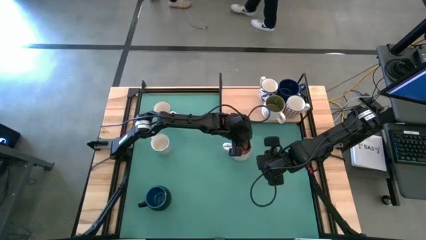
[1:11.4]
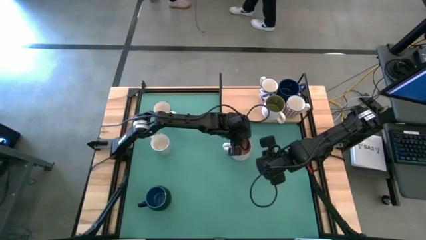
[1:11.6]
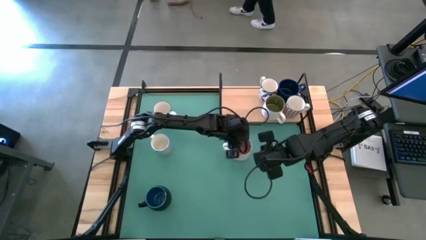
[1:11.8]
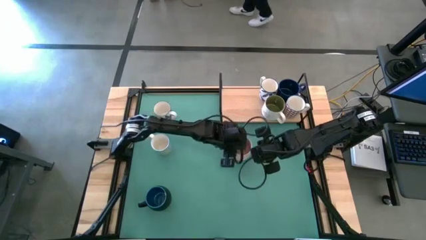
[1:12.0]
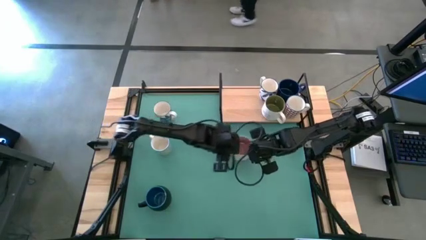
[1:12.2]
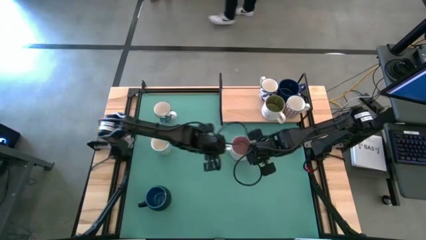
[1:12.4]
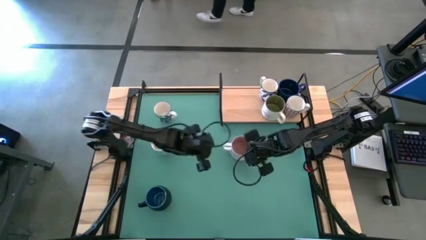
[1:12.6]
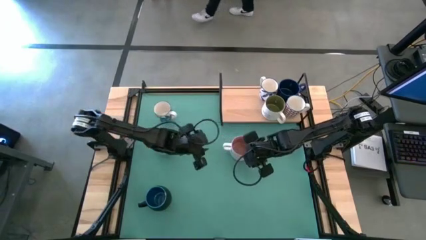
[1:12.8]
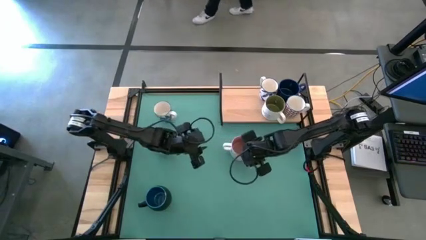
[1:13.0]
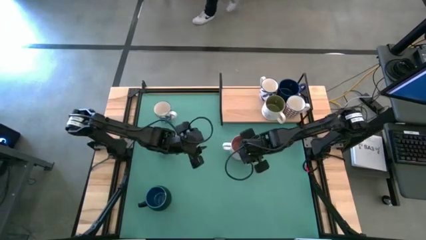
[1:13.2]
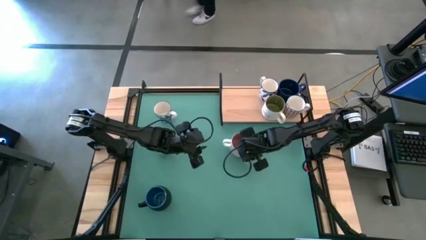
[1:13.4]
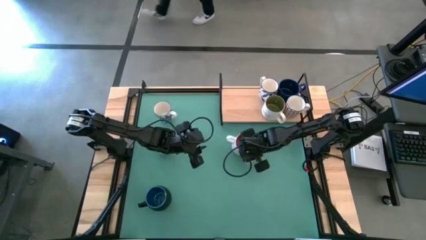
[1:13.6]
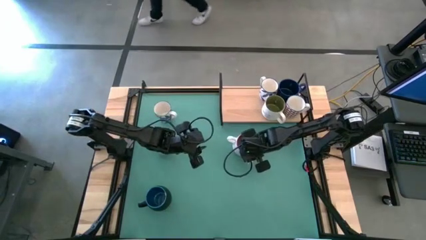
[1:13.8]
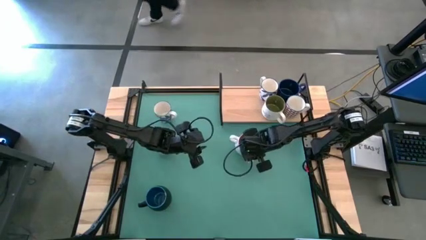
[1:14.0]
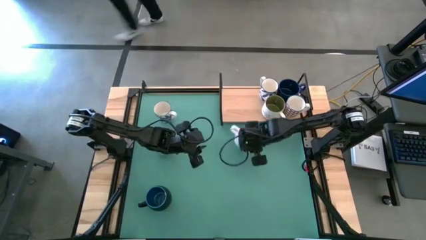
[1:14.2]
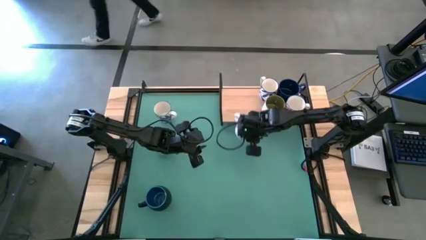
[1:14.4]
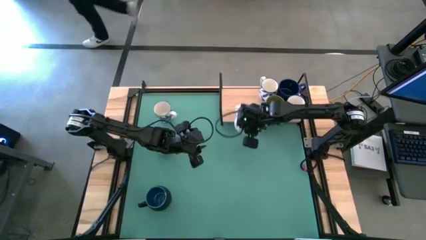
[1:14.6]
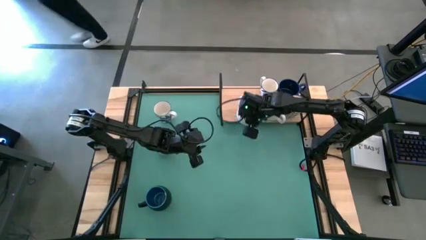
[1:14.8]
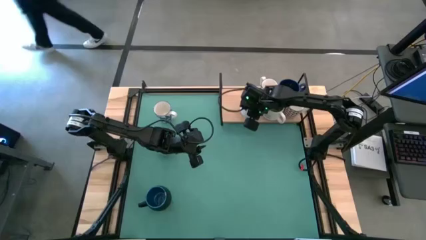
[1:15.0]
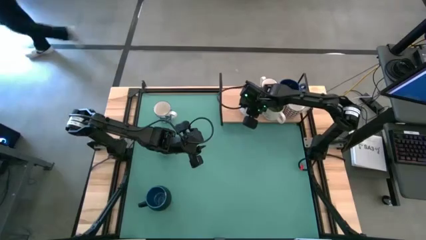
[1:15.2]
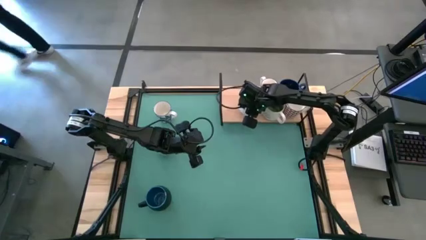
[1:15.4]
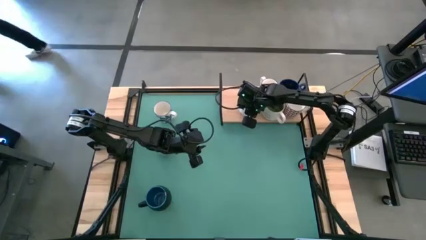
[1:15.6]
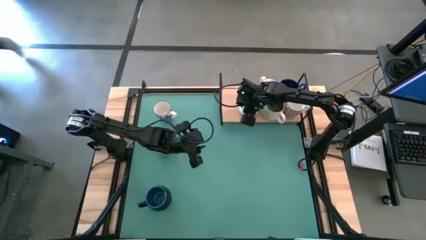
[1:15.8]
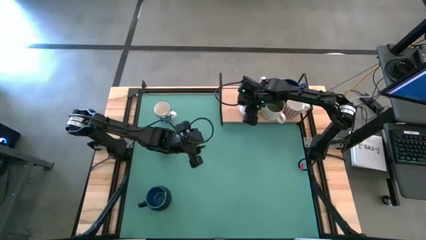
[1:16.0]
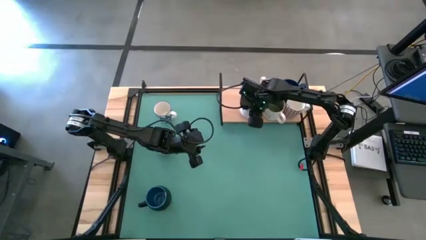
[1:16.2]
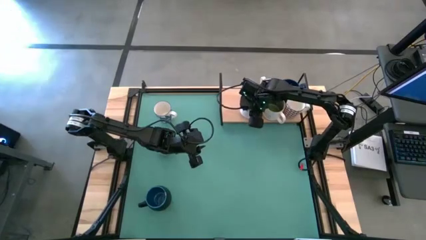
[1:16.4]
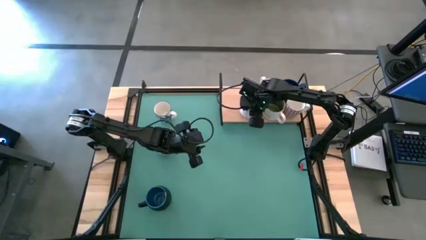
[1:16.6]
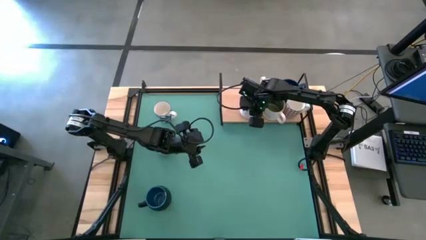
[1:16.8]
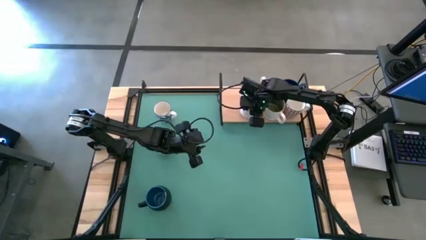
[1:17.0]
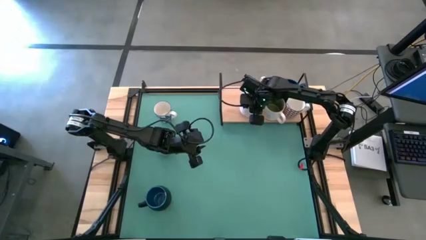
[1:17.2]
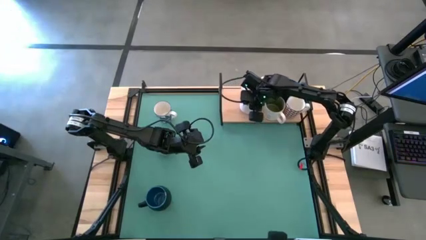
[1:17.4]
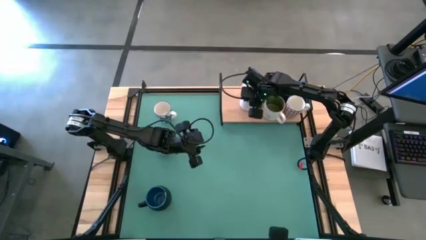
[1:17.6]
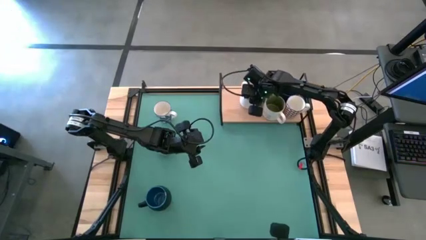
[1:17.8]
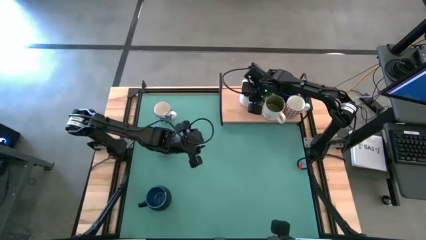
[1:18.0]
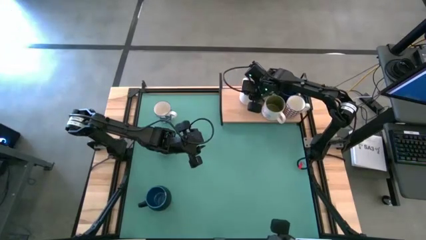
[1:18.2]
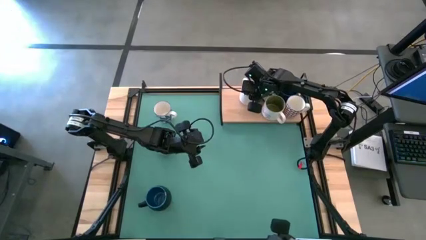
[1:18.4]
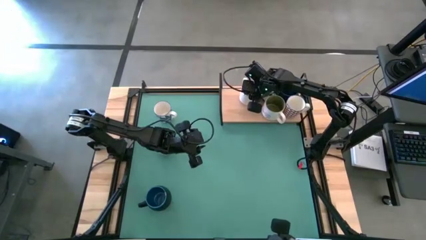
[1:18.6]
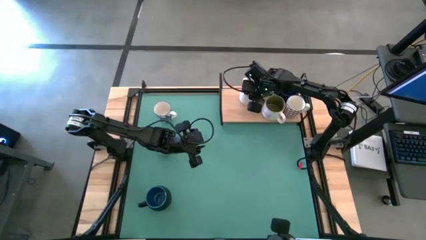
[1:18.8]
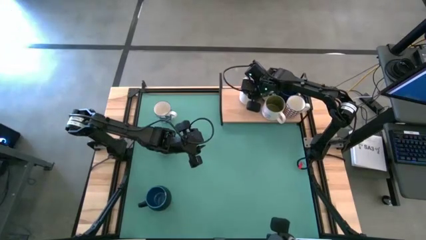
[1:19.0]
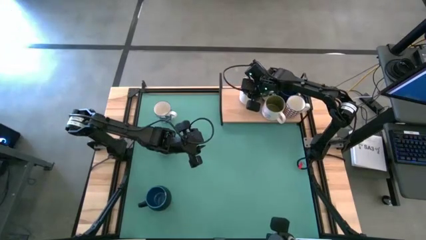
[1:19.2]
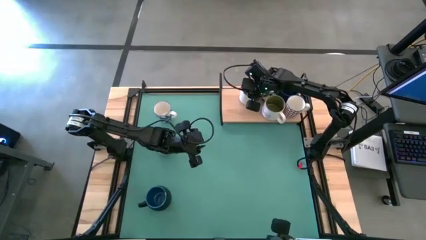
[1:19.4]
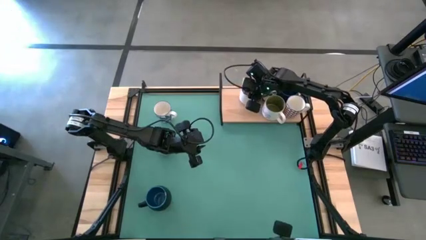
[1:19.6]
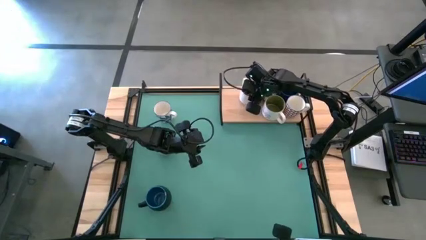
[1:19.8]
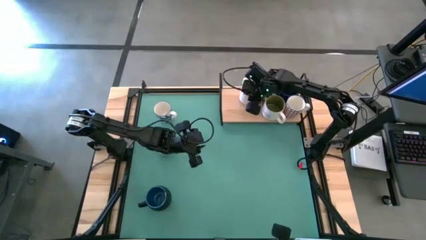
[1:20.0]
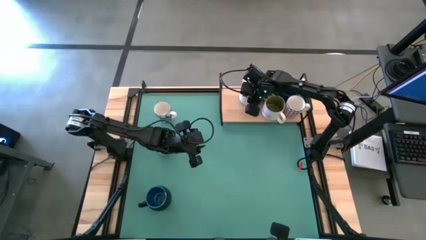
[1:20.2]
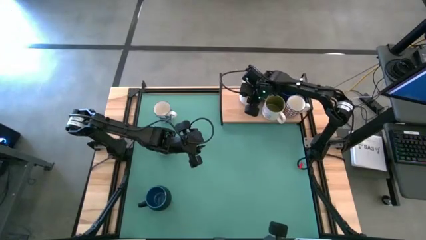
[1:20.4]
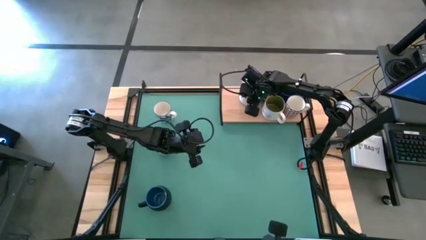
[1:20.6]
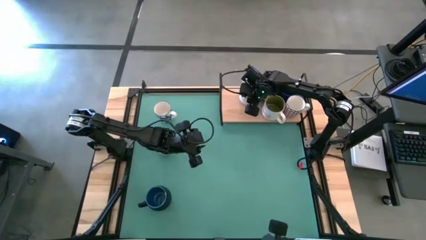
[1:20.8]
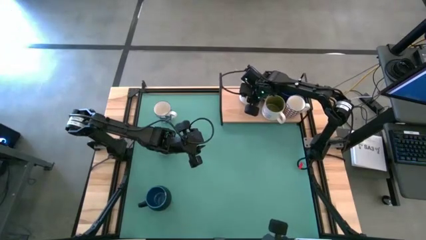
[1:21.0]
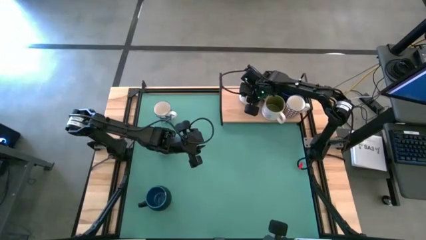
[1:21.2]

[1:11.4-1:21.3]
Task: Place coffee mugs
Put the pink white mug on the shelf
